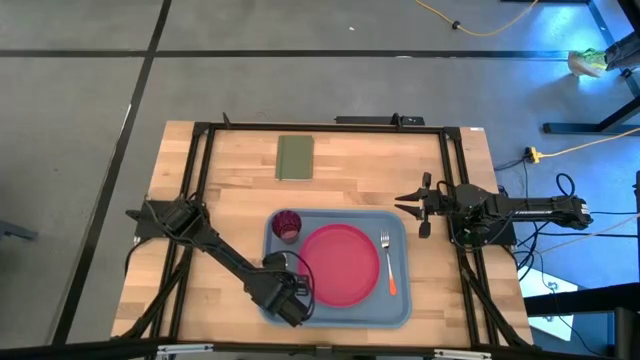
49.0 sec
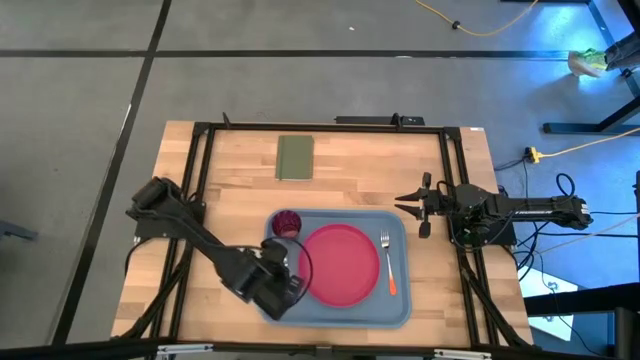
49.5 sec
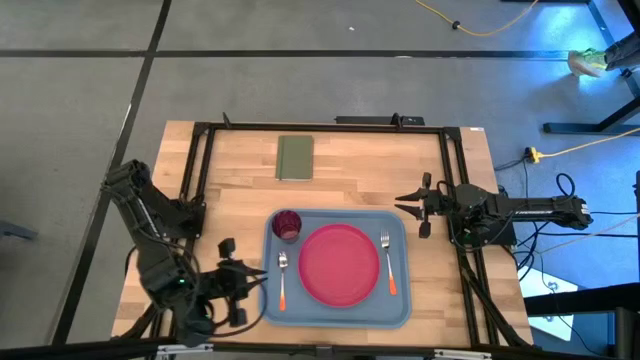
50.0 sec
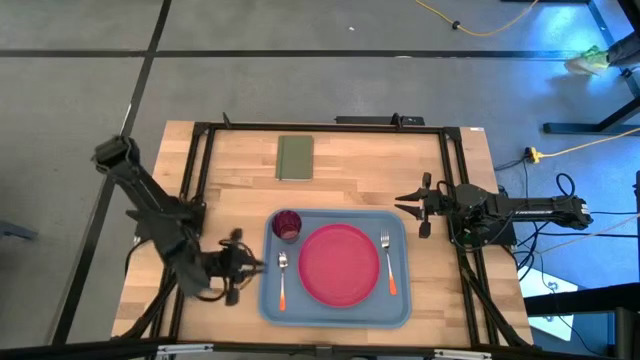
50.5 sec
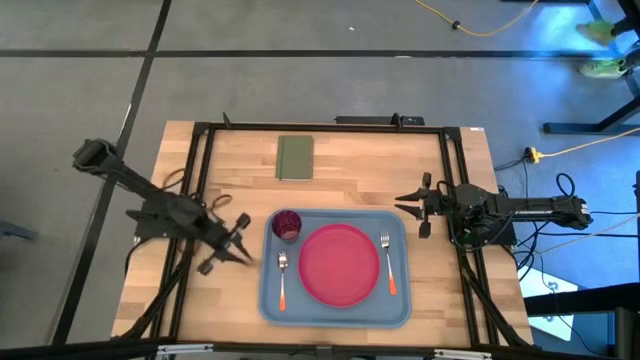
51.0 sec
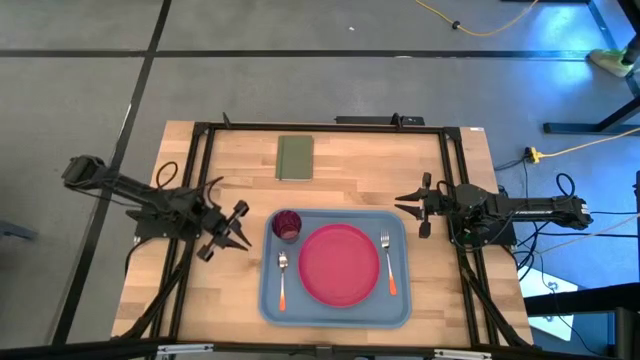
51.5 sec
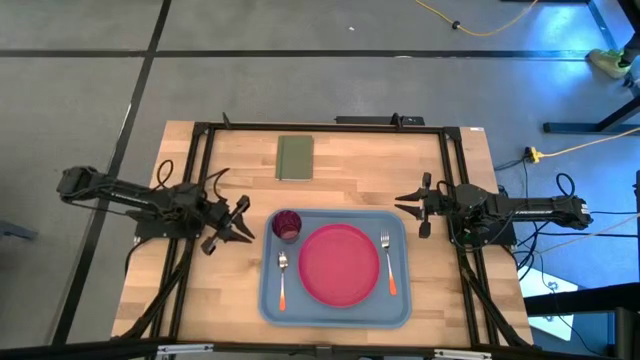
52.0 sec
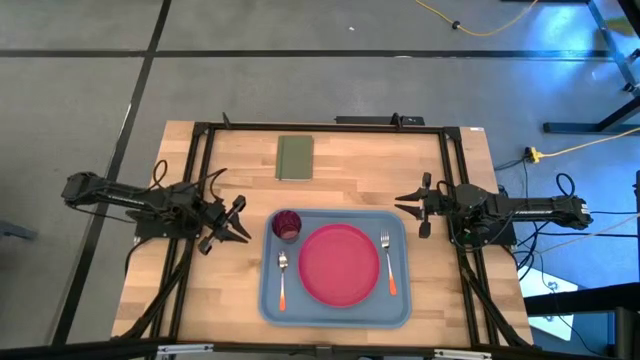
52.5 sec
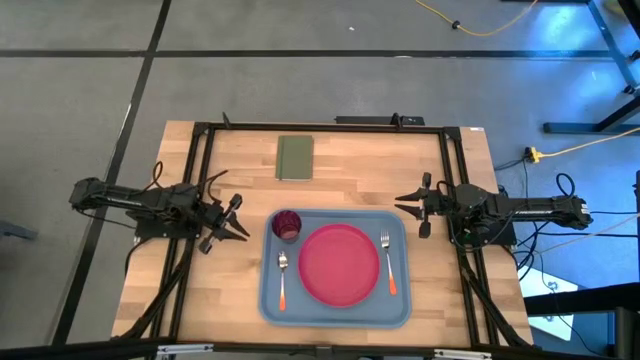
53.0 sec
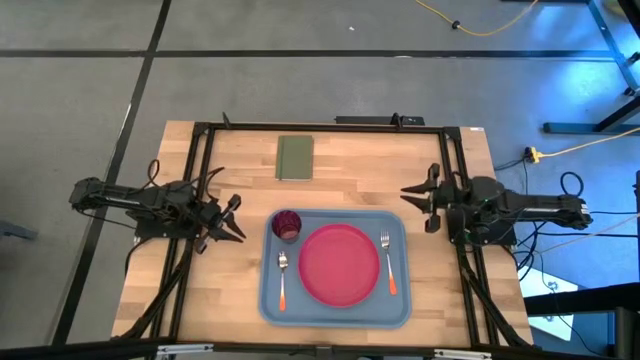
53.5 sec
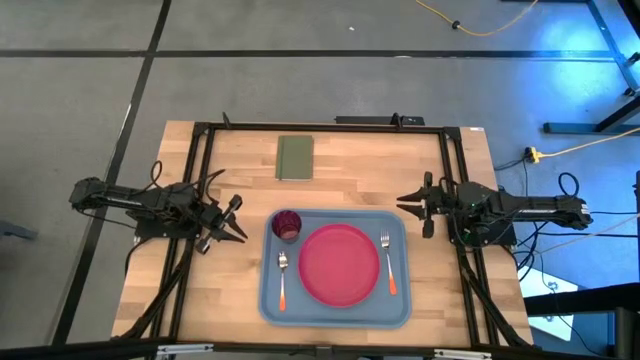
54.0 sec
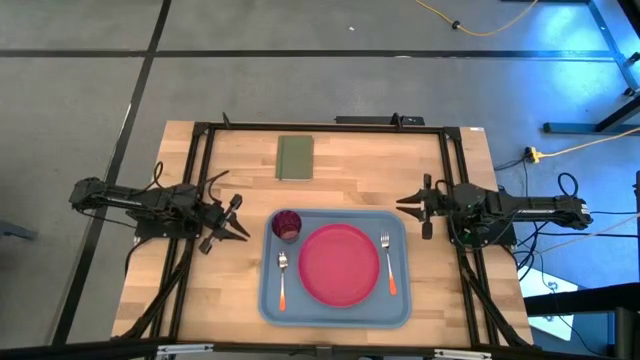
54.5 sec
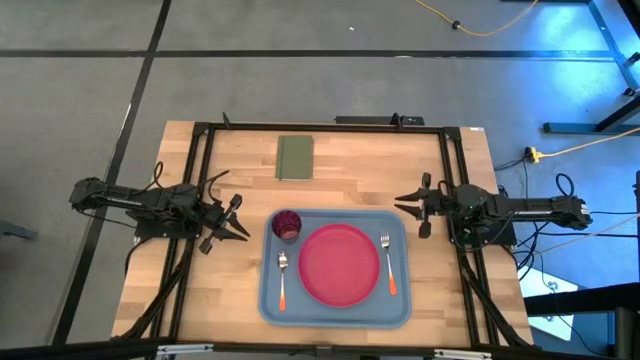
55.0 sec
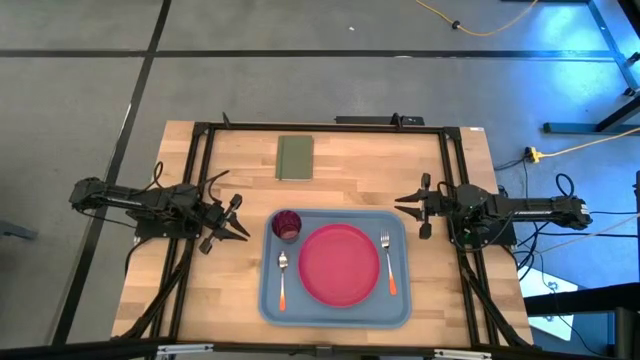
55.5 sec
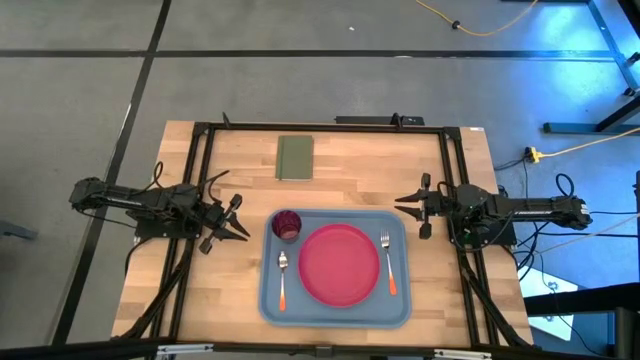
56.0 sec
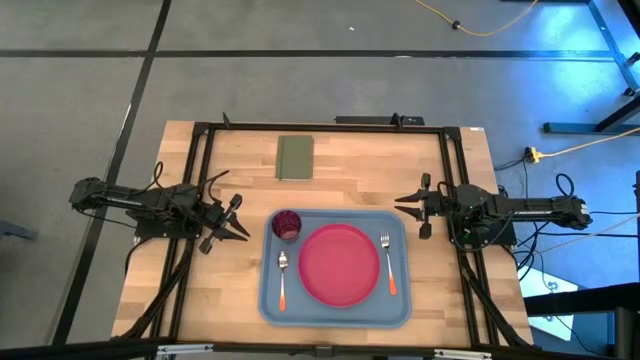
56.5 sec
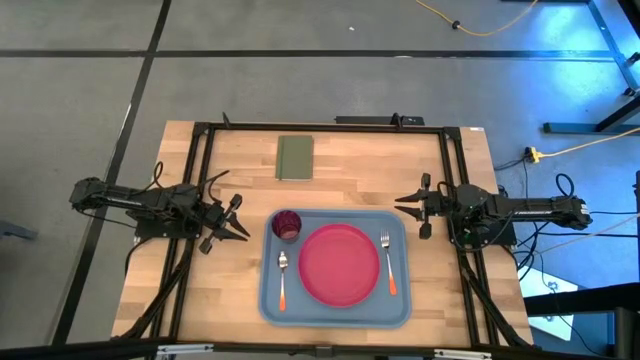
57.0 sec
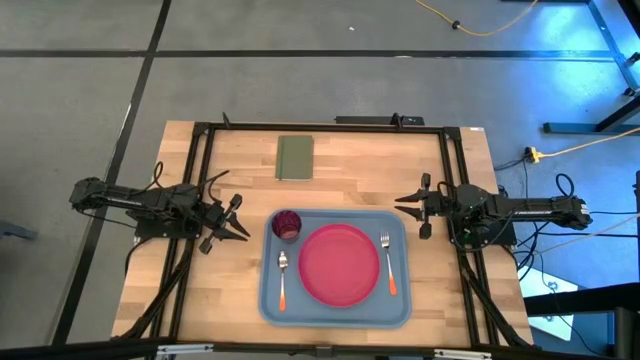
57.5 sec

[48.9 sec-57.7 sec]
Task: Pick and place plate/cup/fork/spoon on tray
Return to Home Position

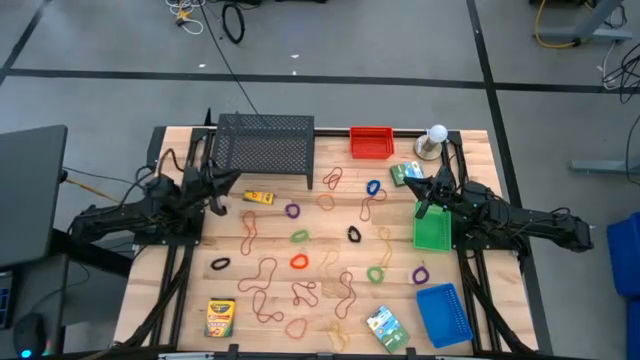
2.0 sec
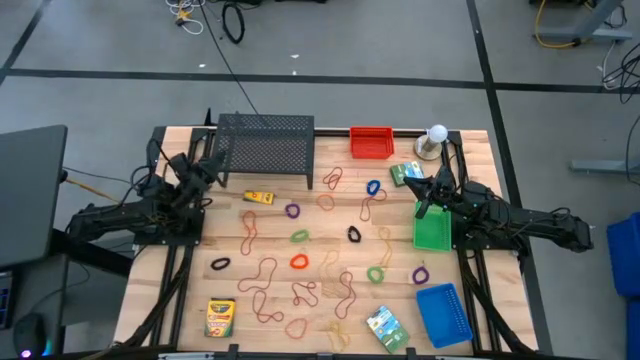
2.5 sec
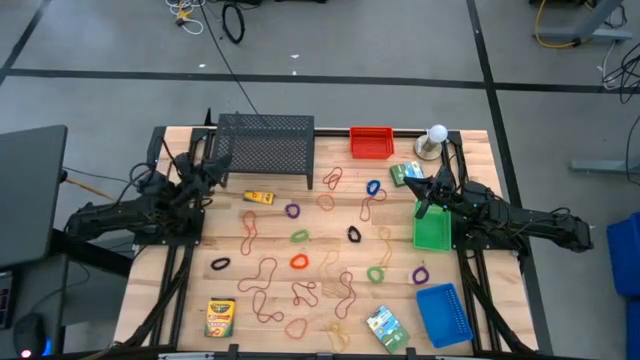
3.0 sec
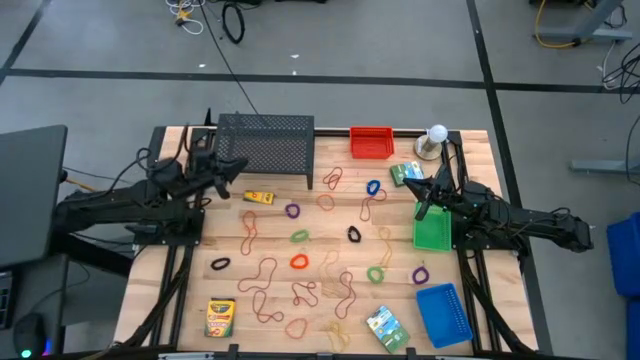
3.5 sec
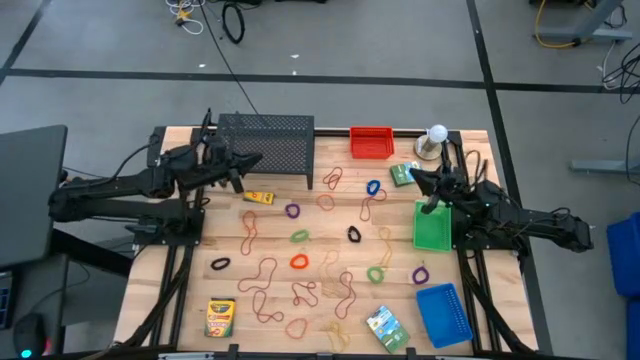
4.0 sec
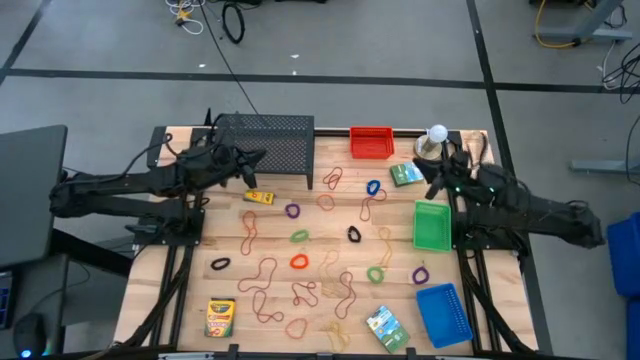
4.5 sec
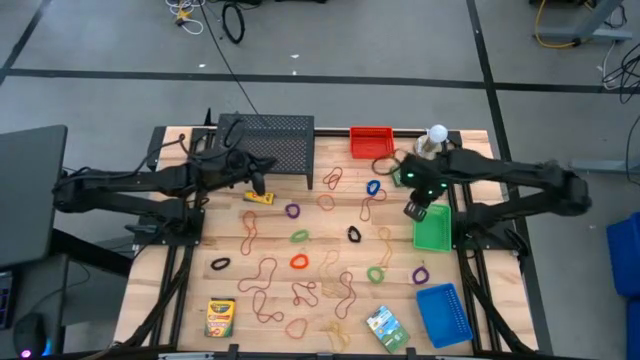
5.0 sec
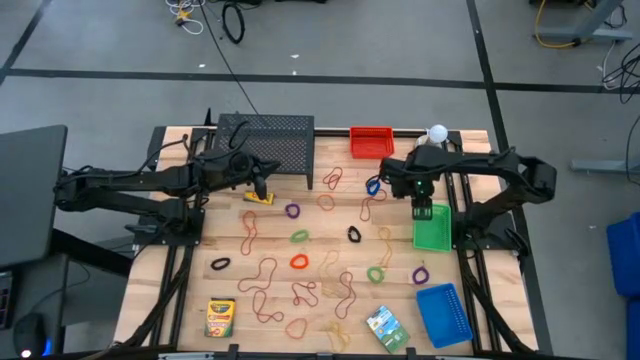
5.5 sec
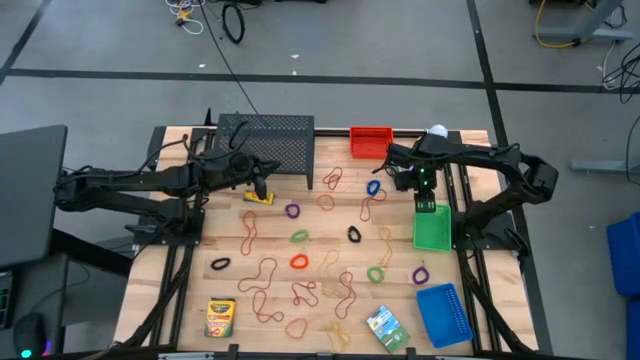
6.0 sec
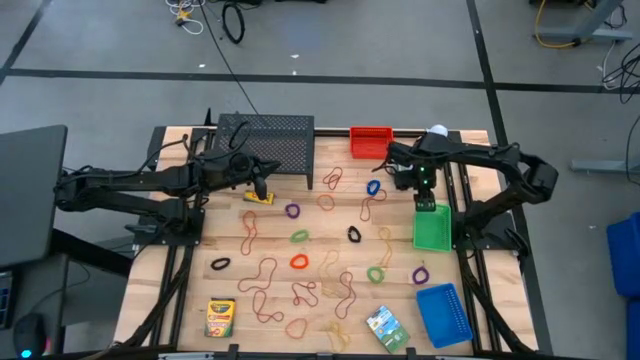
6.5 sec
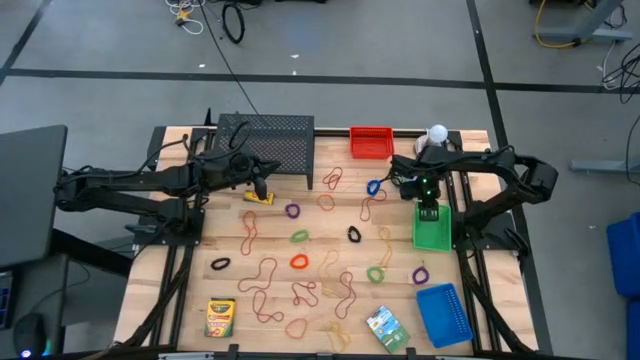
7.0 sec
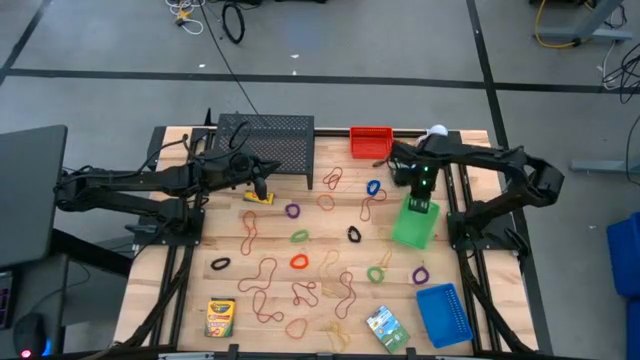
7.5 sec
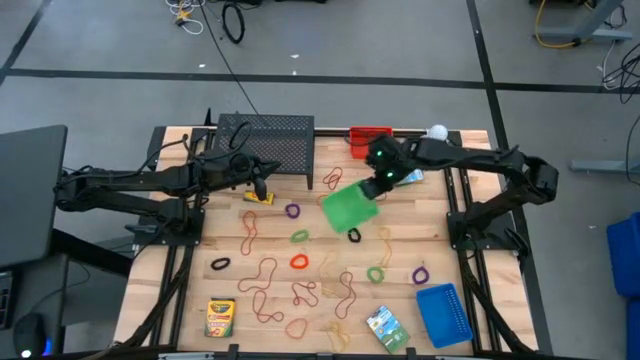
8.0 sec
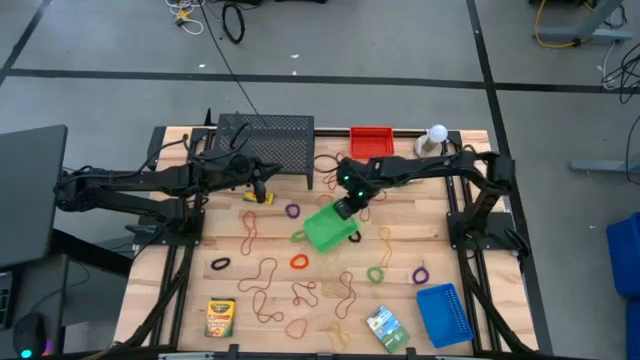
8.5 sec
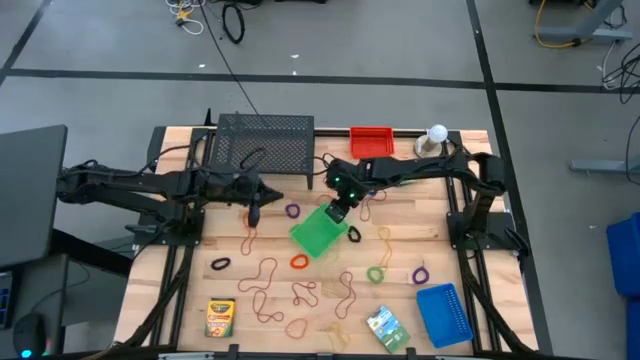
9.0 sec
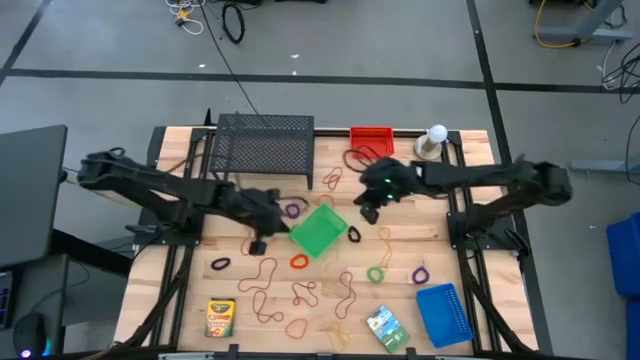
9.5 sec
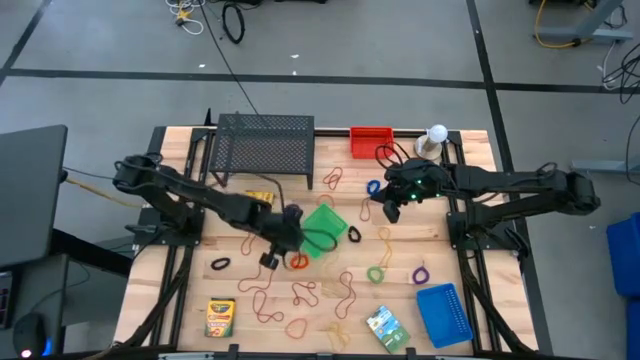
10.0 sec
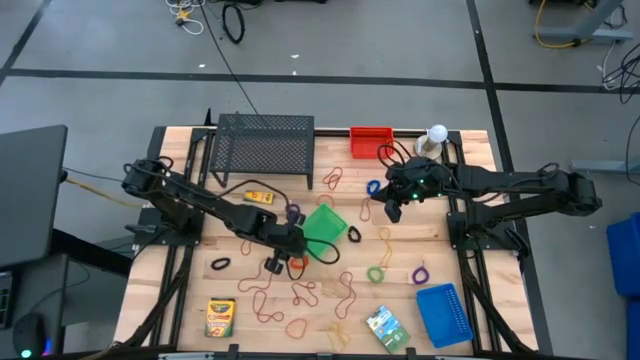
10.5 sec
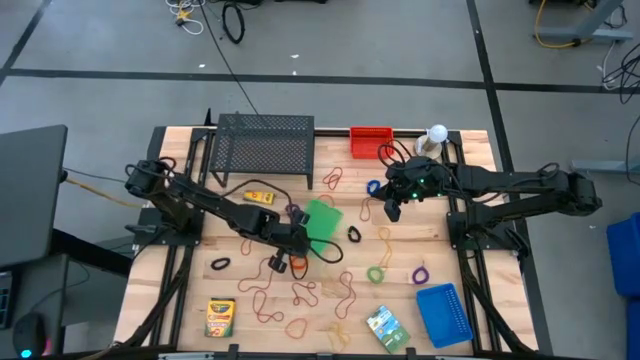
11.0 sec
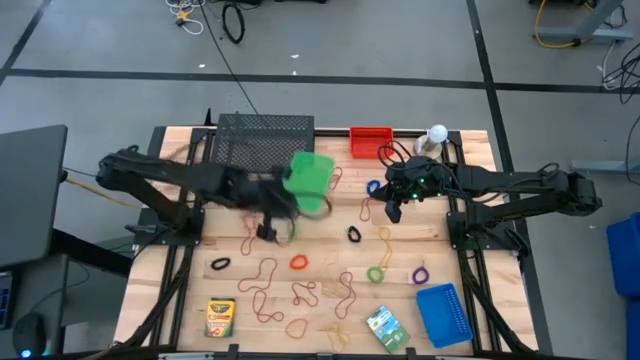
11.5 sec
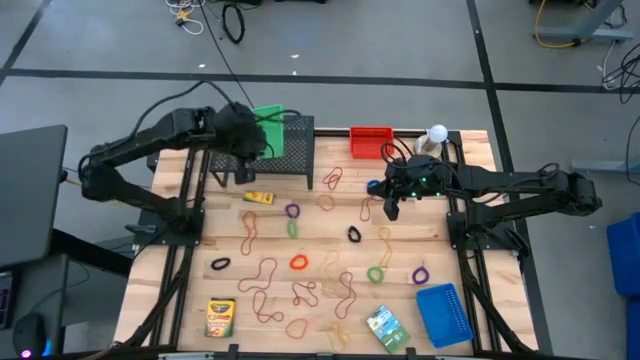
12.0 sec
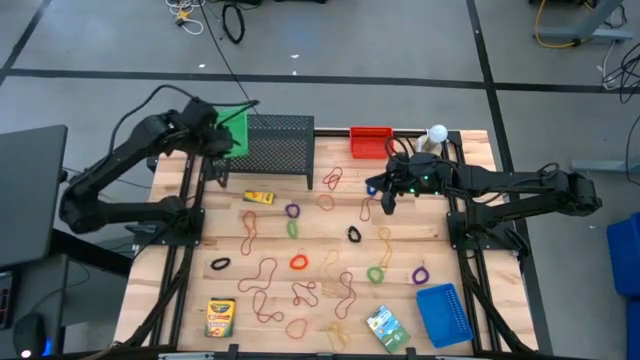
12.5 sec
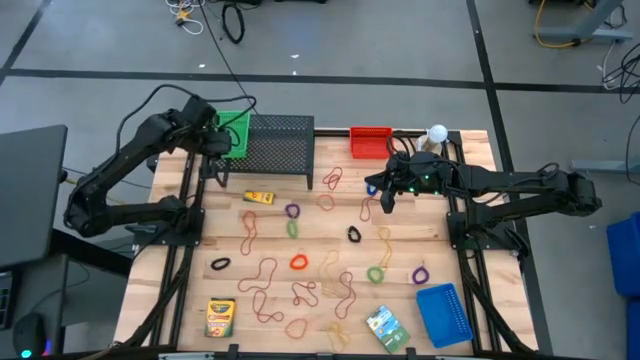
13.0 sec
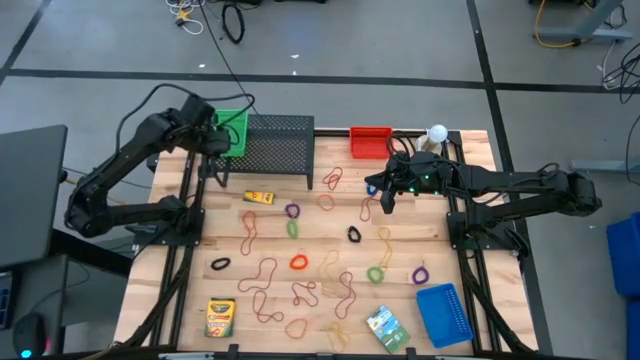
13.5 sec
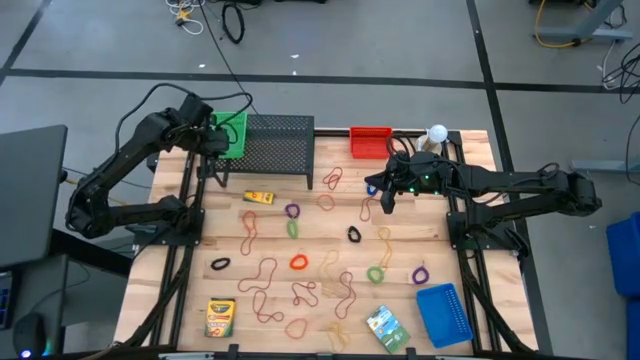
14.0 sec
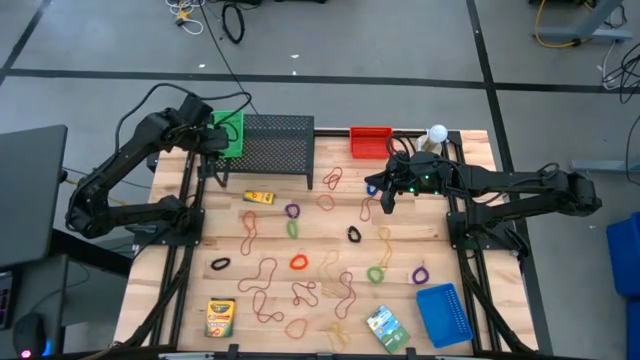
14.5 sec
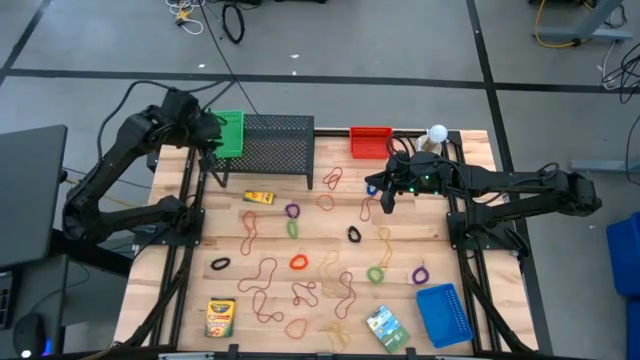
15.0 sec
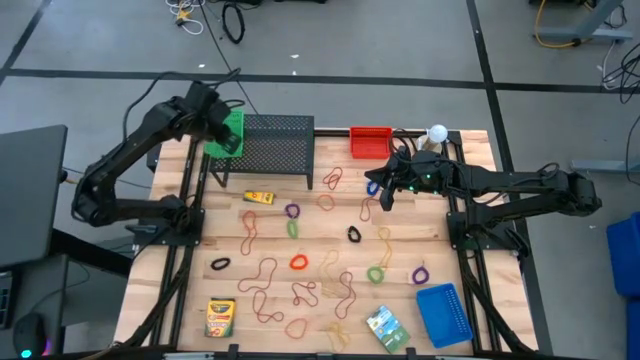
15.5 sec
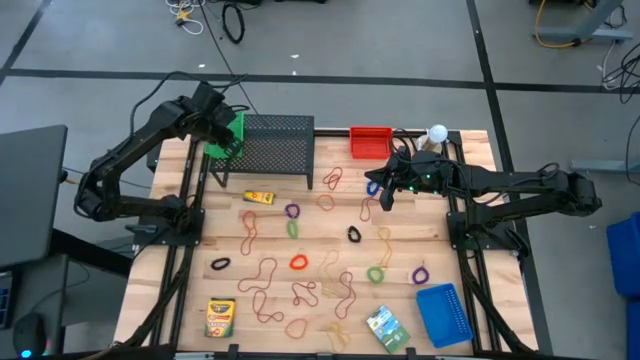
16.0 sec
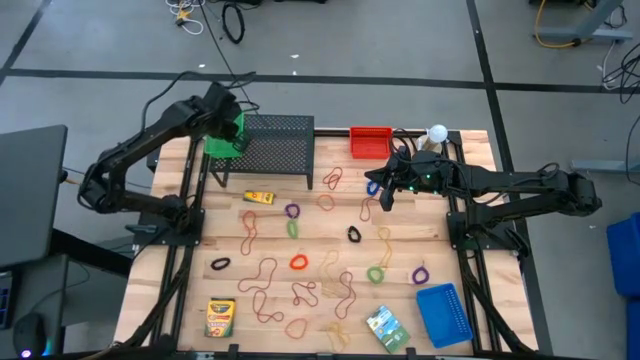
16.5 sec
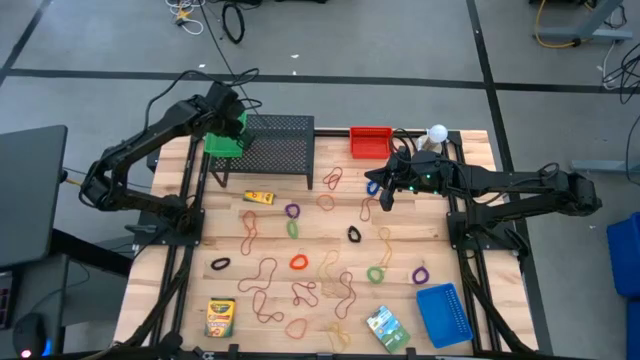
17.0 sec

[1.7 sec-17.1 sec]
Task: Pick & Place Office Desk Supplies
Put the green bin on the shelf
